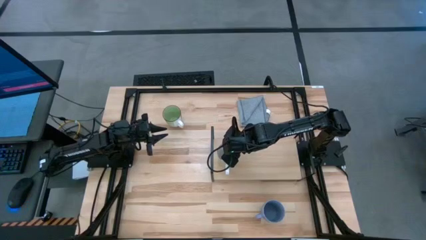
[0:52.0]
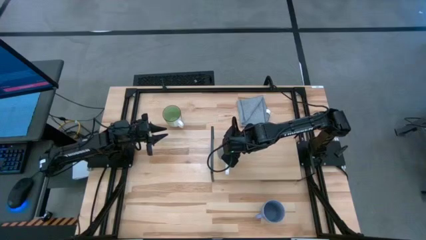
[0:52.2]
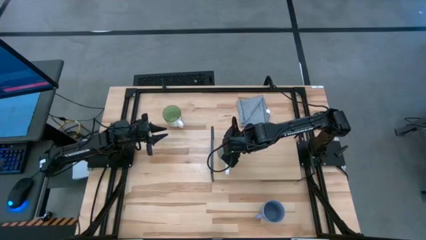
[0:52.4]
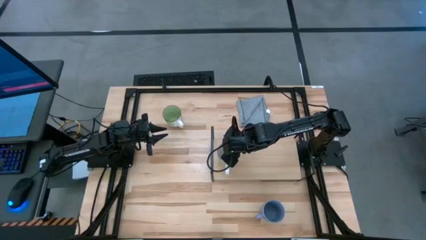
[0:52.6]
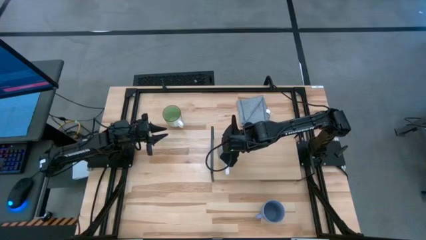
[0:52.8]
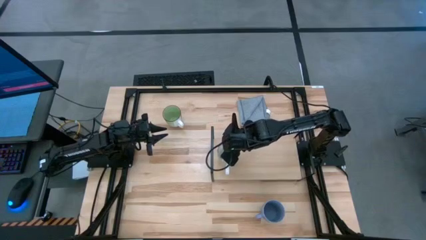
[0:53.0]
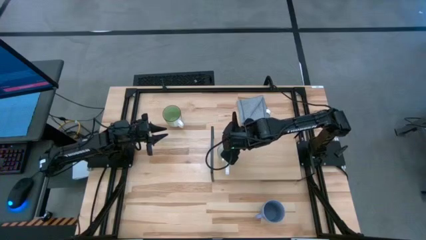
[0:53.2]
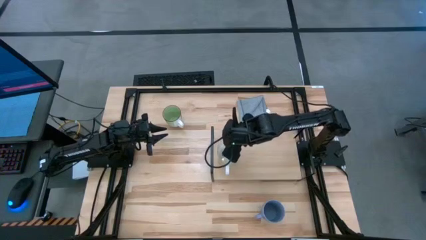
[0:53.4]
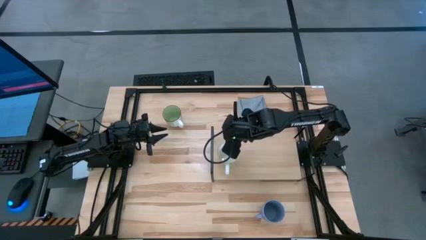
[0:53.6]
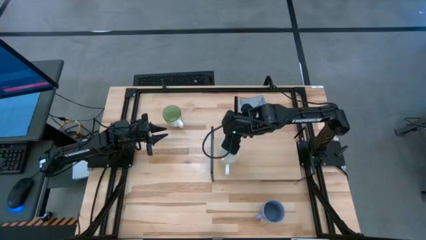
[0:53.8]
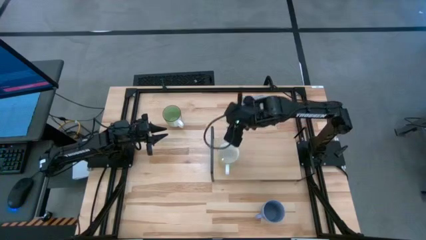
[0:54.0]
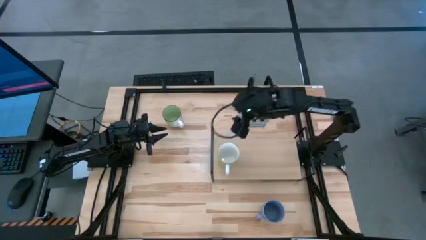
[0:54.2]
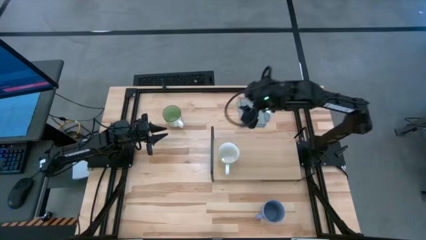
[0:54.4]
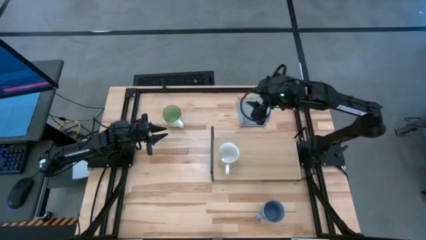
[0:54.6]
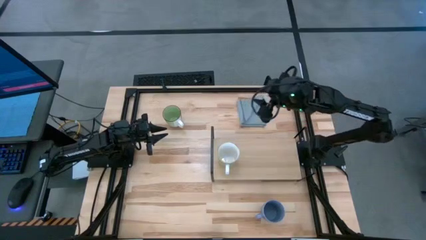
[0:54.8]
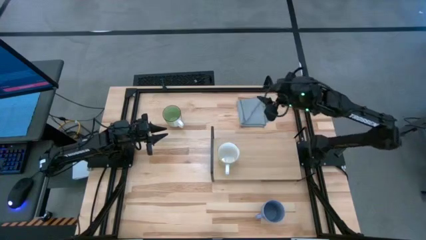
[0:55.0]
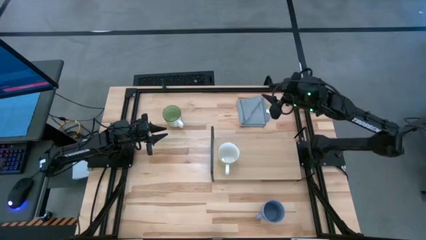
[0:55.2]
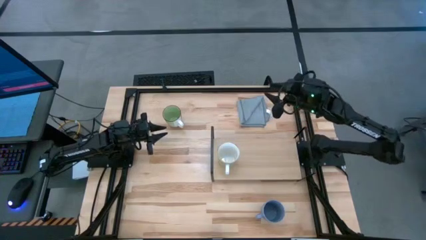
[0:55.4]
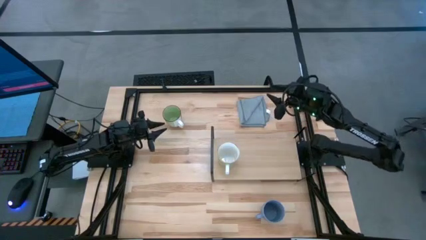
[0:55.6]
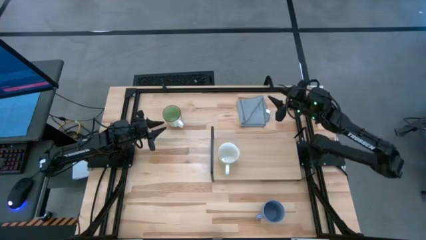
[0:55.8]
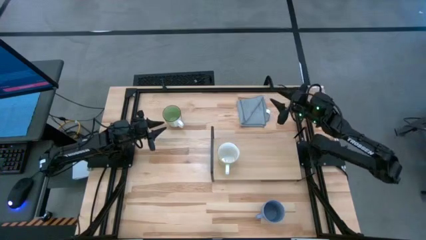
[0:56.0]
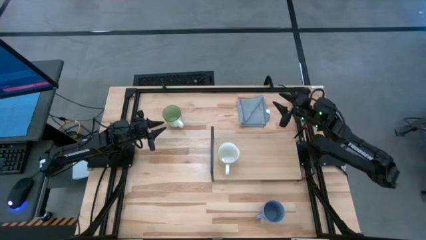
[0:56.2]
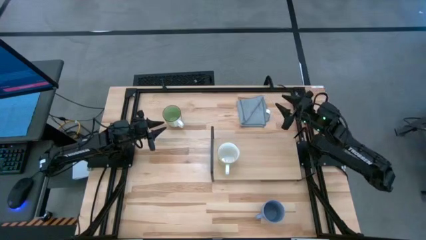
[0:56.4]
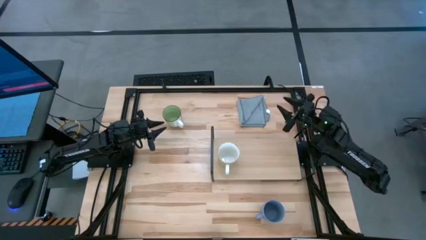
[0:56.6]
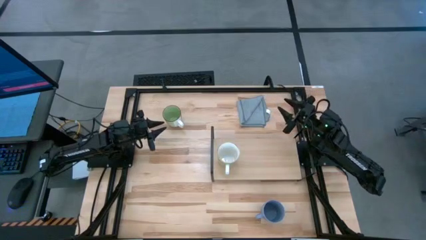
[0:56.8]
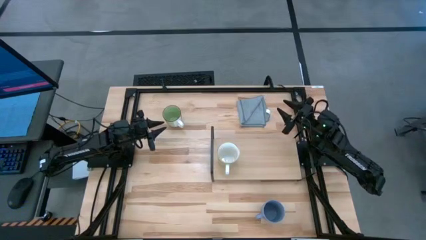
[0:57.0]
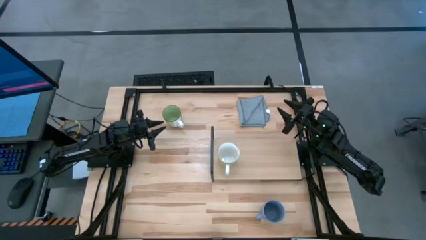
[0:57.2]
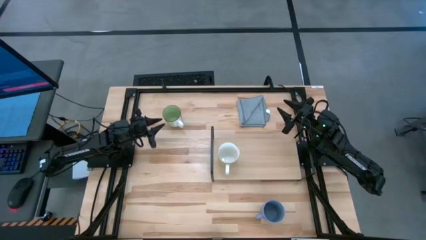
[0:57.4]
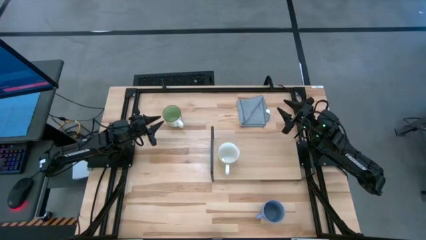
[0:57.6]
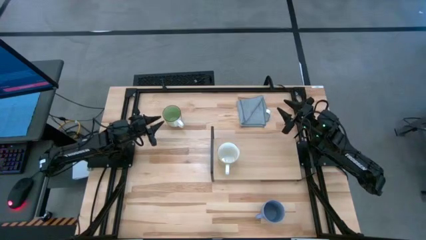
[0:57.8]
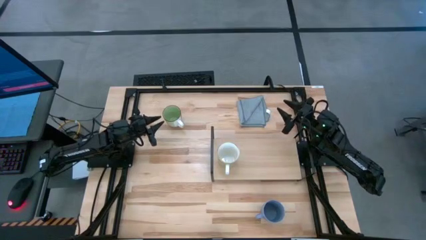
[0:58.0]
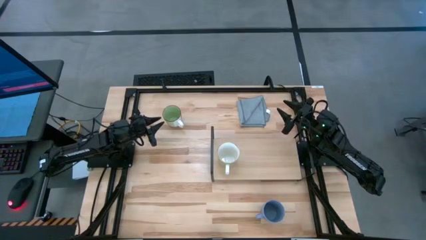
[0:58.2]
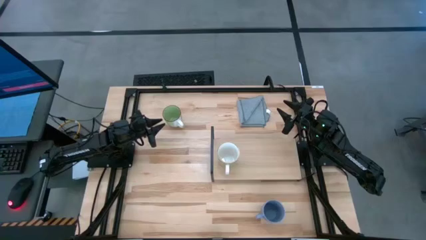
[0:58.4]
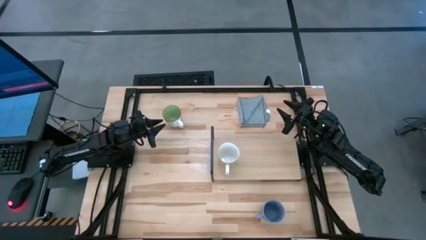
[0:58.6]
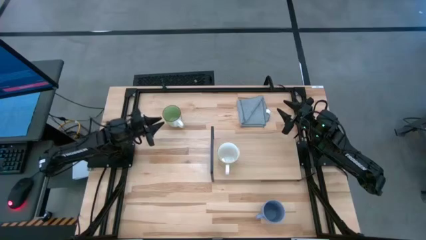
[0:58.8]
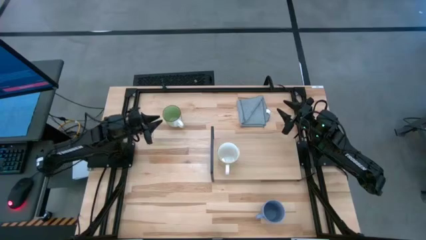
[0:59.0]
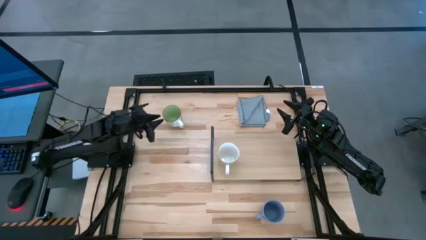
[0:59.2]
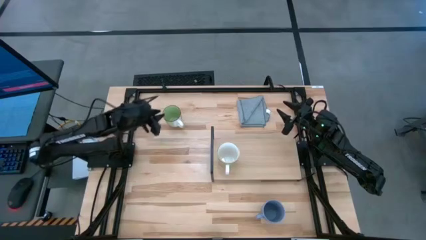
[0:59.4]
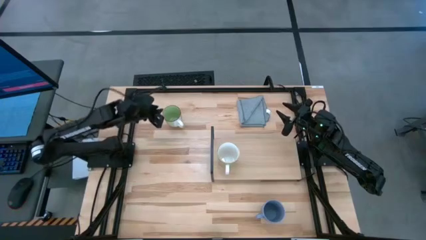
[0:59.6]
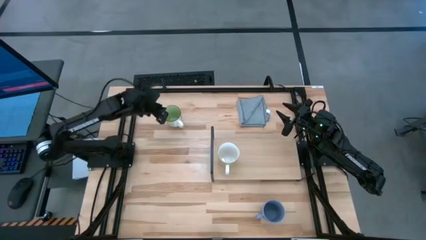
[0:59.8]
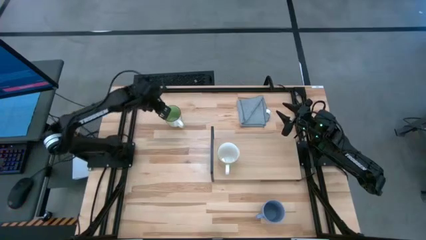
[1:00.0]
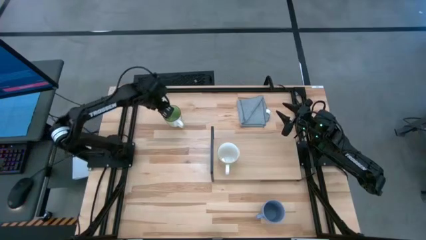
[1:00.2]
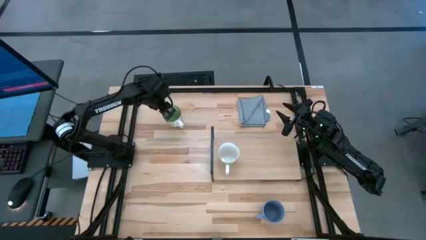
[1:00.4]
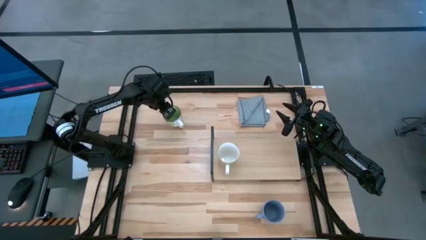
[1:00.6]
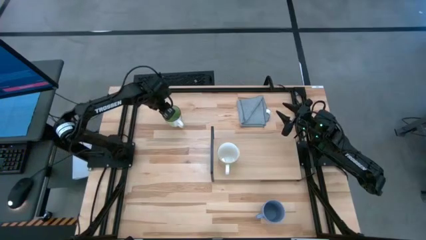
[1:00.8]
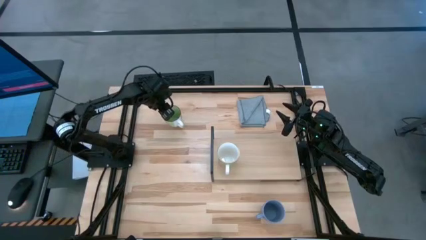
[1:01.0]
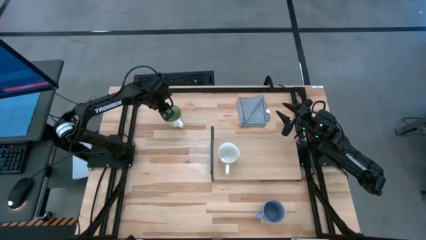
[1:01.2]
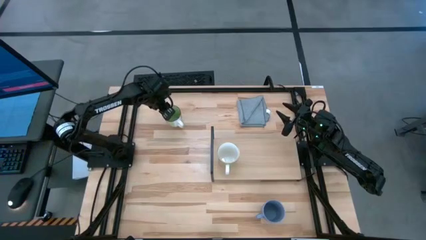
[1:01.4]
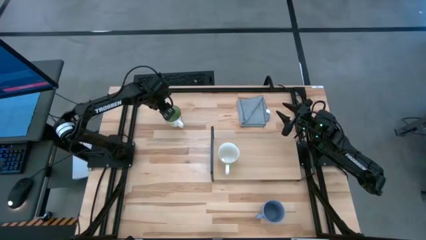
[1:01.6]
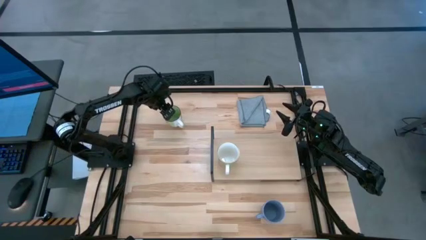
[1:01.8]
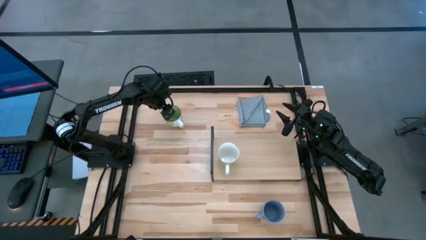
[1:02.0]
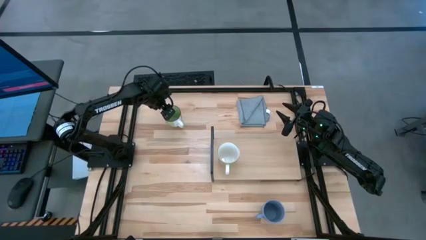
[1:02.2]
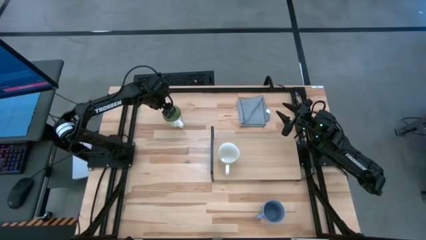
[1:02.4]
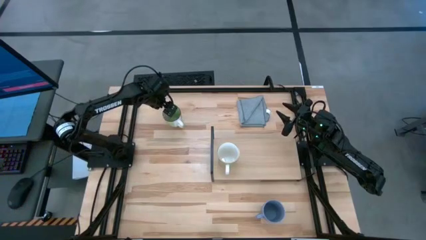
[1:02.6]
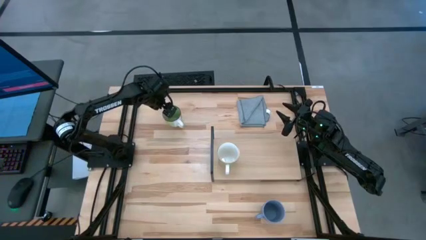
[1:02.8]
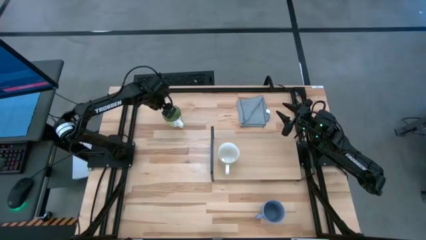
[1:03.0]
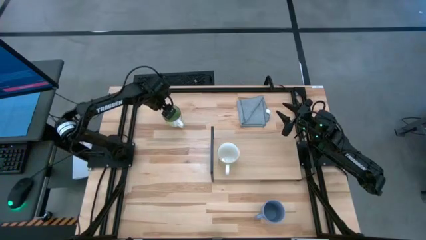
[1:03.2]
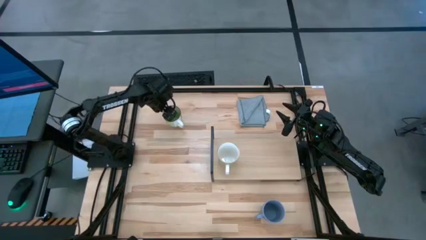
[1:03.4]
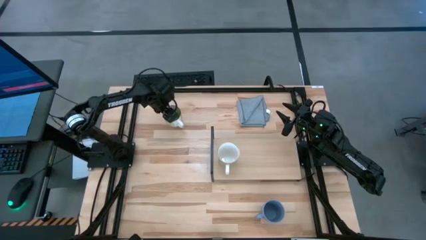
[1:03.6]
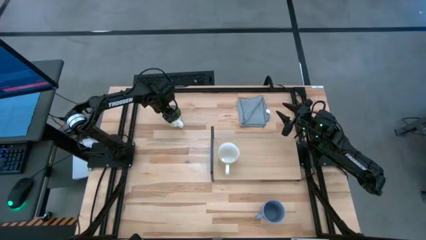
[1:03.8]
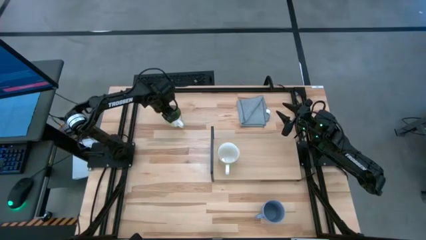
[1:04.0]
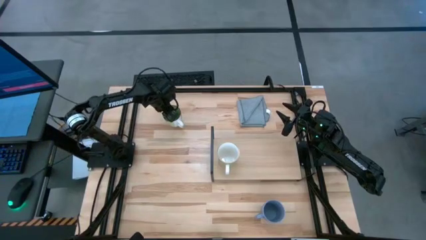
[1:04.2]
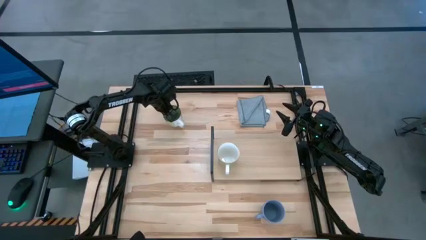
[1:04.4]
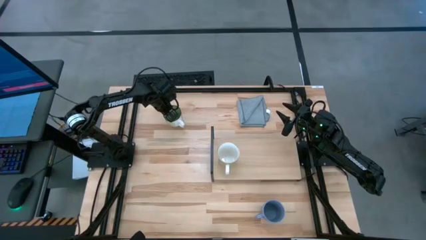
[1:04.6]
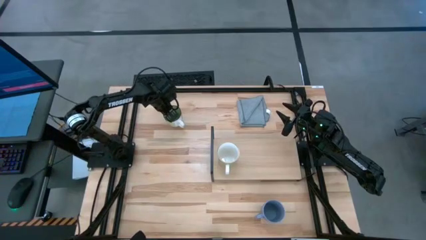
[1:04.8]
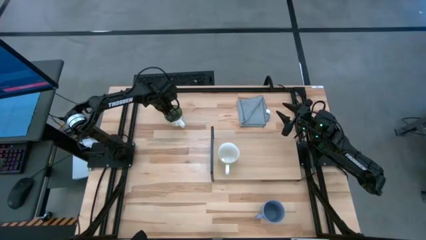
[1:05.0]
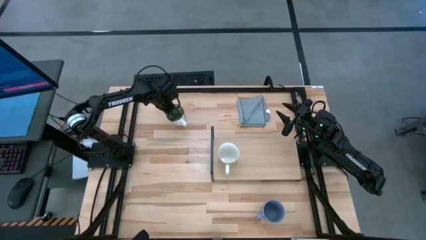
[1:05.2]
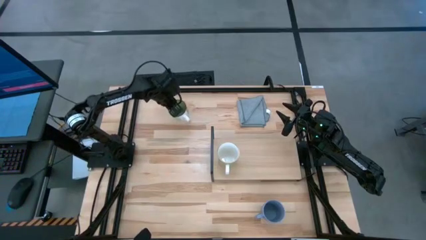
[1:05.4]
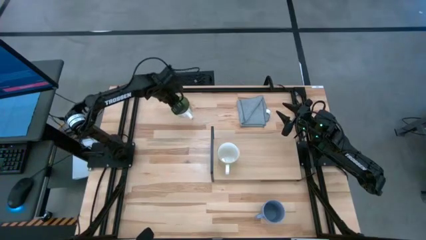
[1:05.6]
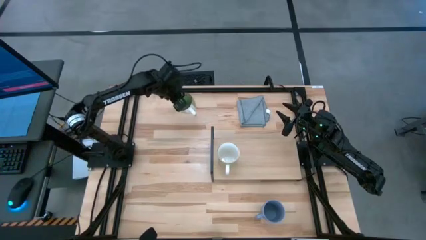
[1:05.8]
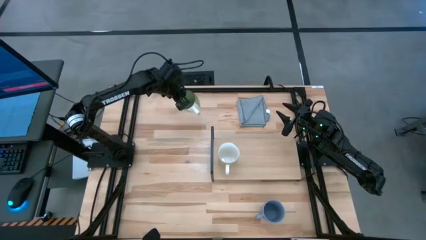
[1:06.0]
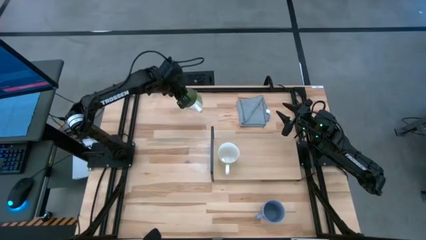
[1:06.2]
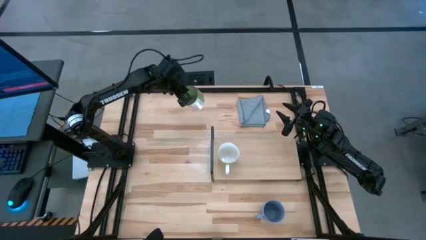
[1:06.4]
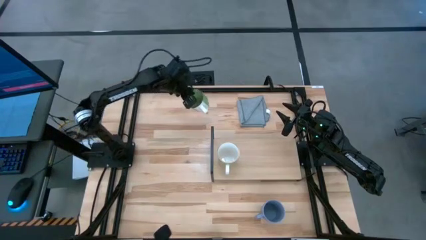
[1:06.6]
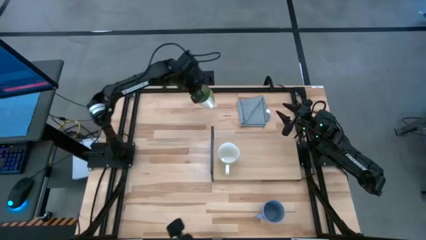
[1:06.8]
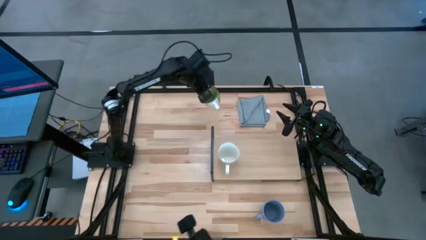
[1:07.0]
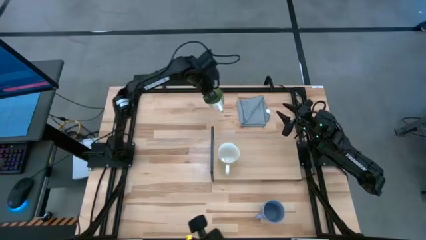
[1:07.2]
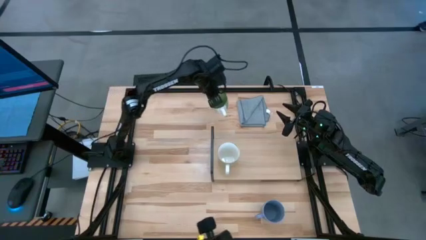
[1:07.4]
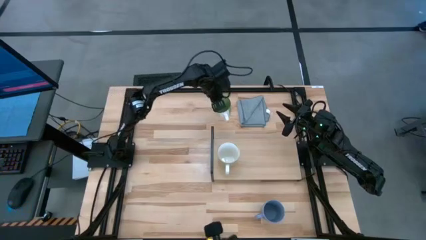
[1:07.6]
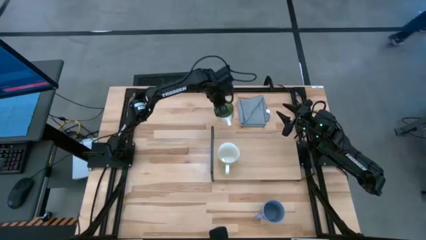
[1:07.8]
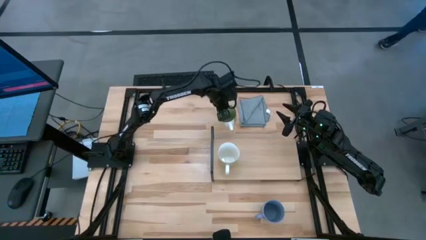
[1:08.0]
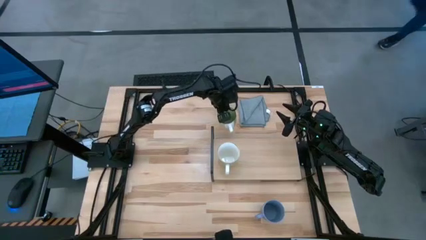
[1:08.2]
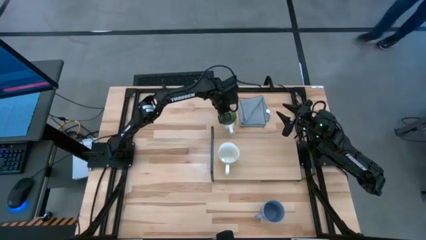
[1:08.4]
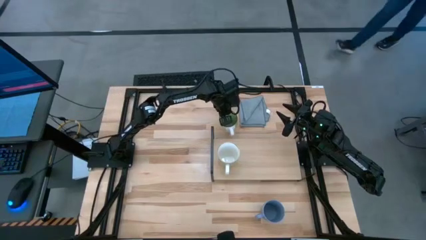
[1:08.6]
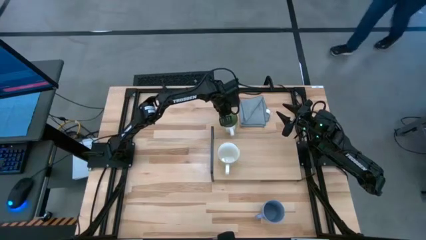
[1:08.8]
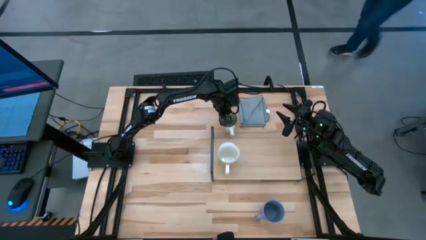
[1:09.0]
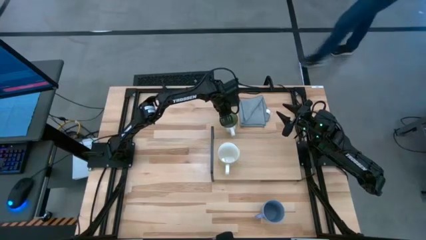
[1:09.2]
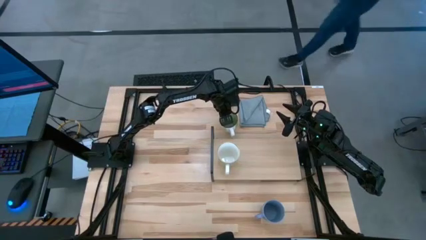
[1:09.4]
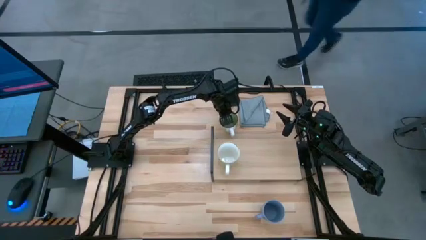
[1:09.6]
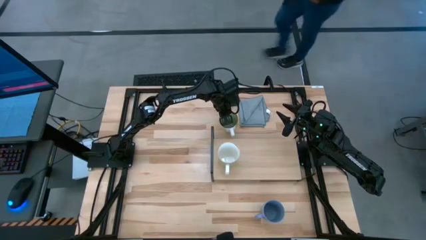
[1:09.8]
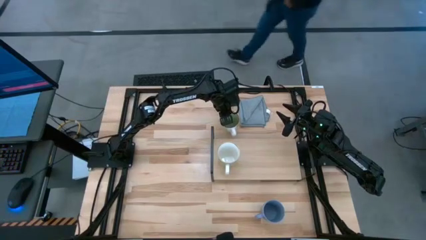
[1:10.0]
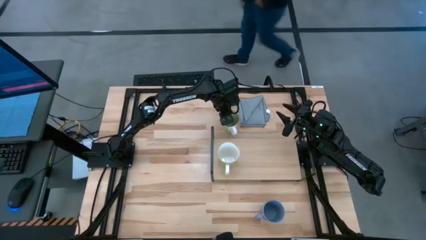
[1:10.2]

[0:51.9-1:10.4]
Task: Stack small to large cups/mugs on shelf
Put the green mug on the shelf
